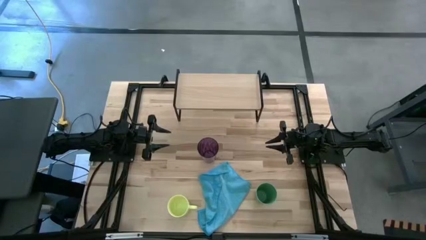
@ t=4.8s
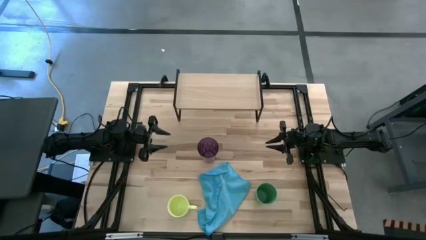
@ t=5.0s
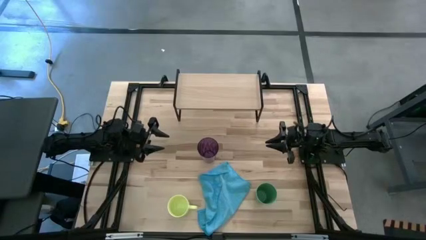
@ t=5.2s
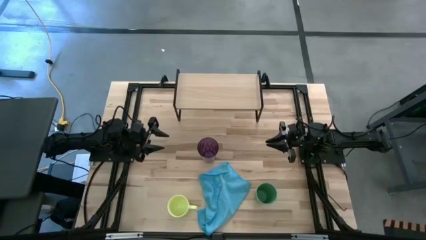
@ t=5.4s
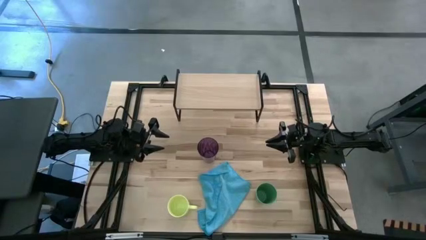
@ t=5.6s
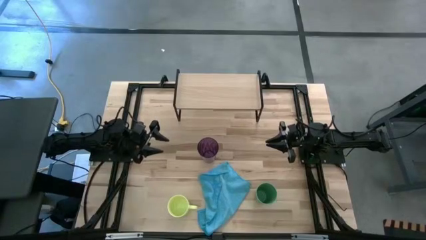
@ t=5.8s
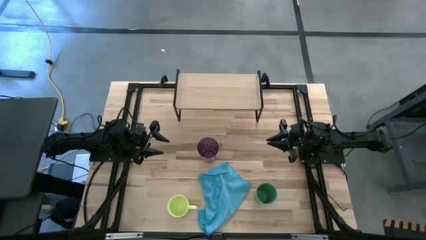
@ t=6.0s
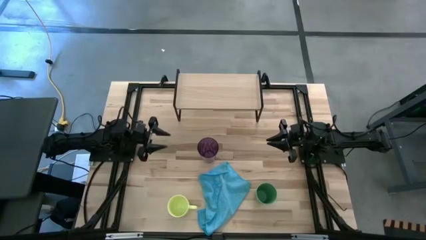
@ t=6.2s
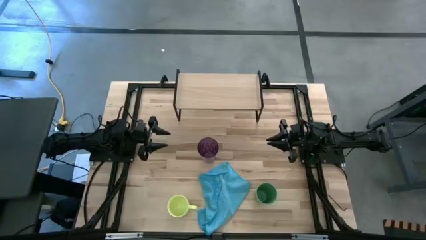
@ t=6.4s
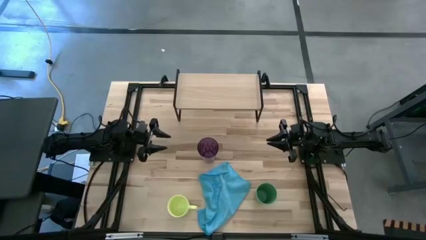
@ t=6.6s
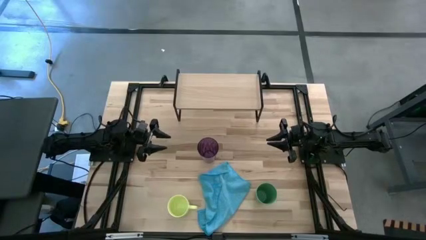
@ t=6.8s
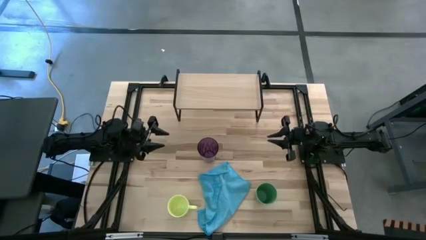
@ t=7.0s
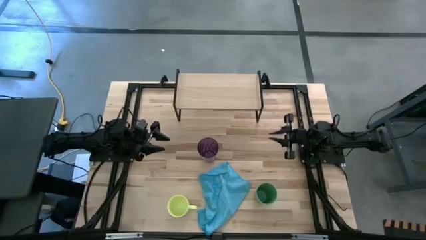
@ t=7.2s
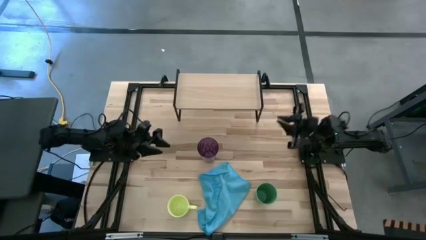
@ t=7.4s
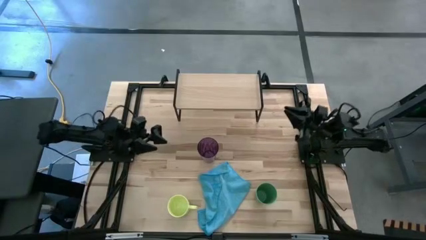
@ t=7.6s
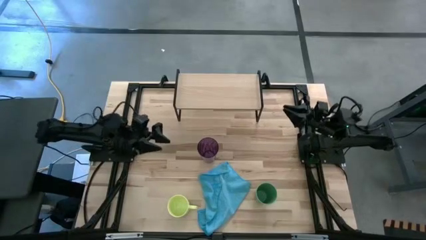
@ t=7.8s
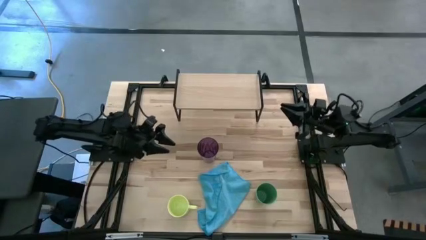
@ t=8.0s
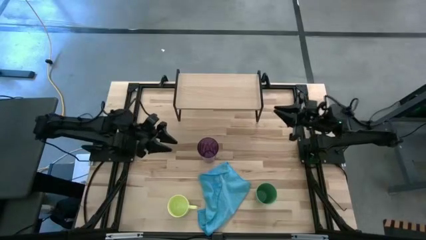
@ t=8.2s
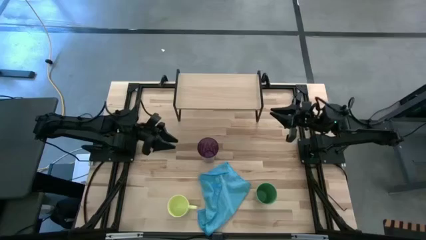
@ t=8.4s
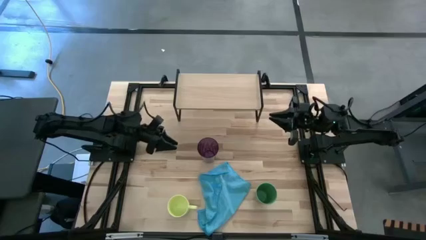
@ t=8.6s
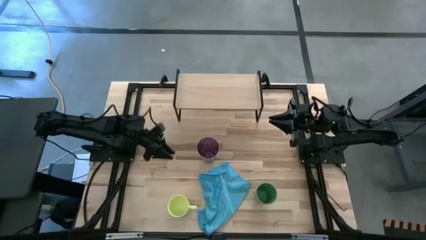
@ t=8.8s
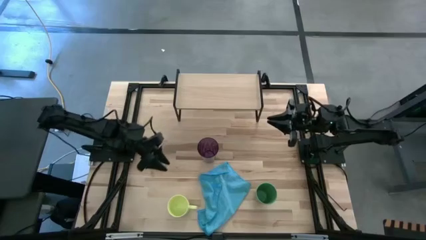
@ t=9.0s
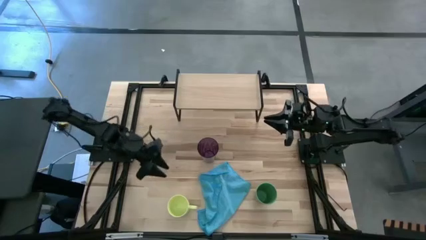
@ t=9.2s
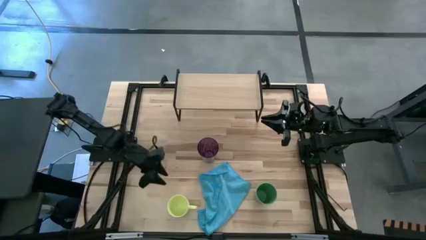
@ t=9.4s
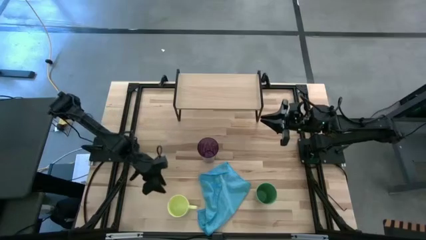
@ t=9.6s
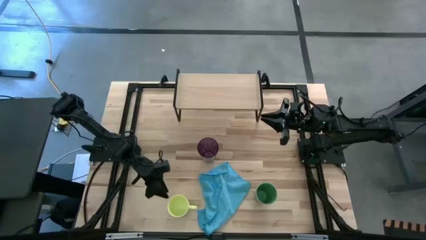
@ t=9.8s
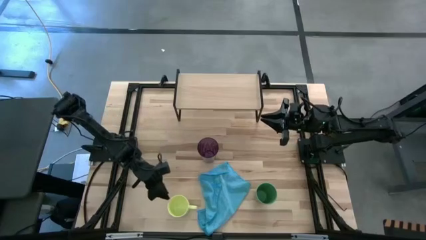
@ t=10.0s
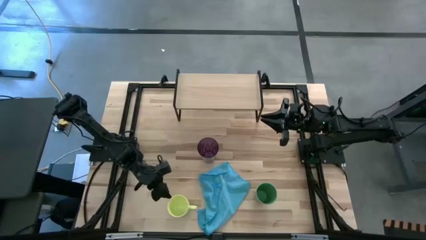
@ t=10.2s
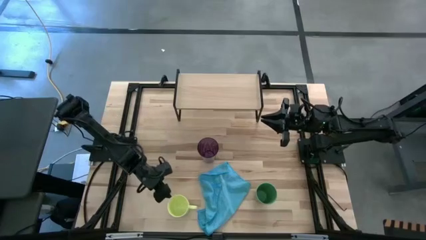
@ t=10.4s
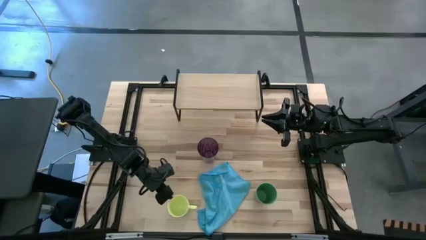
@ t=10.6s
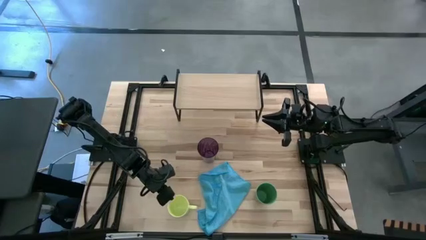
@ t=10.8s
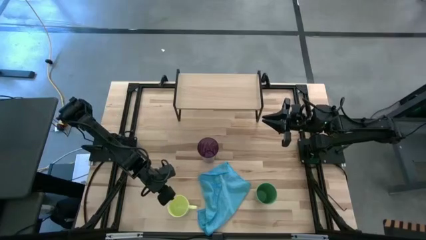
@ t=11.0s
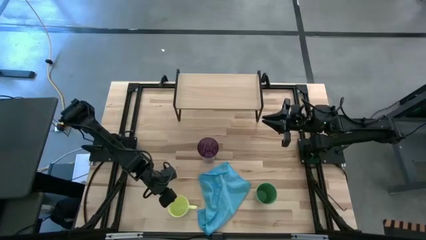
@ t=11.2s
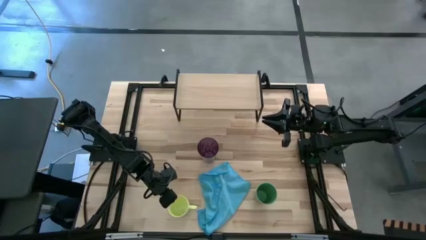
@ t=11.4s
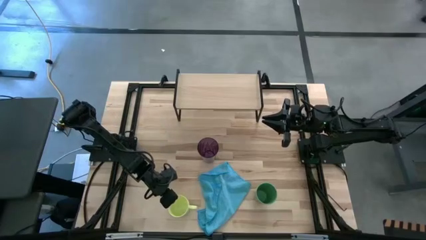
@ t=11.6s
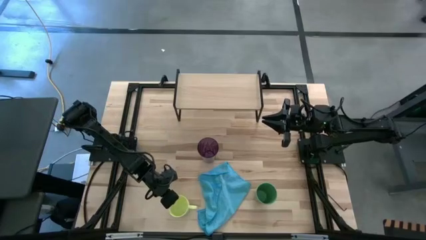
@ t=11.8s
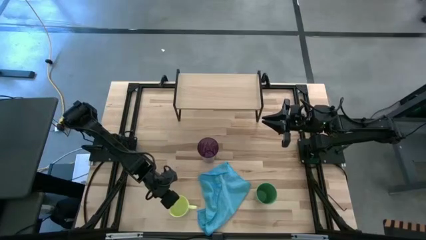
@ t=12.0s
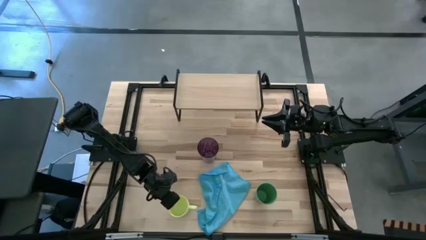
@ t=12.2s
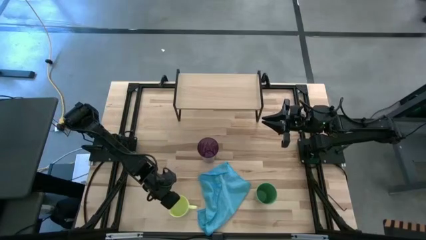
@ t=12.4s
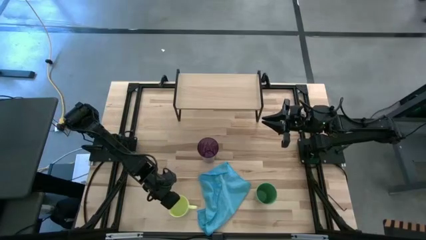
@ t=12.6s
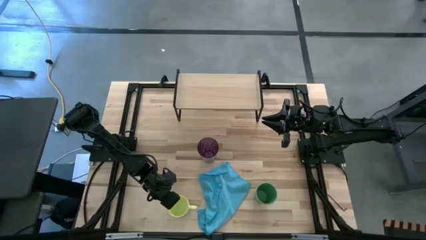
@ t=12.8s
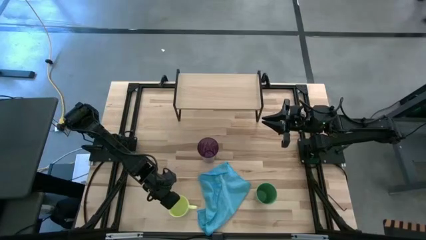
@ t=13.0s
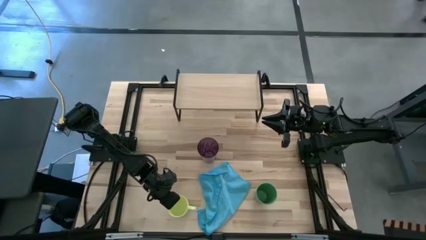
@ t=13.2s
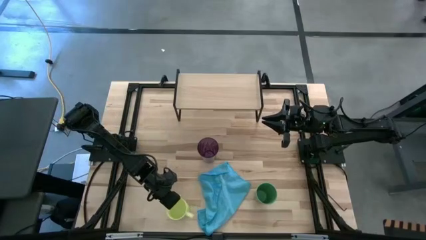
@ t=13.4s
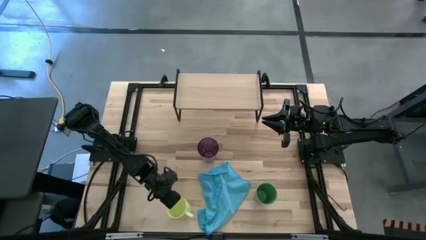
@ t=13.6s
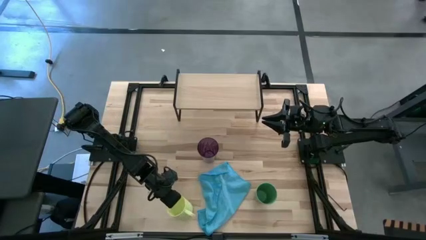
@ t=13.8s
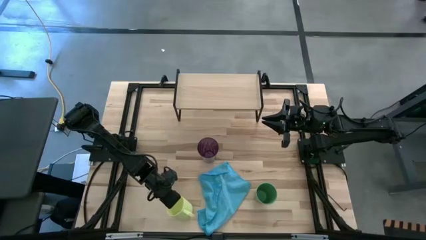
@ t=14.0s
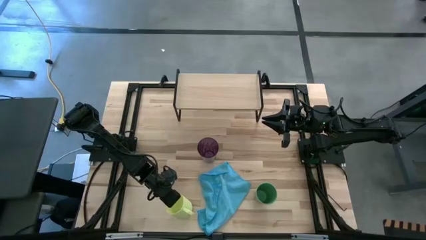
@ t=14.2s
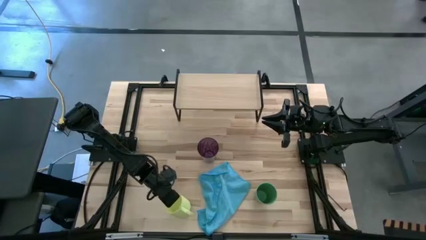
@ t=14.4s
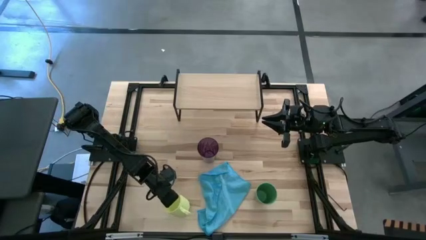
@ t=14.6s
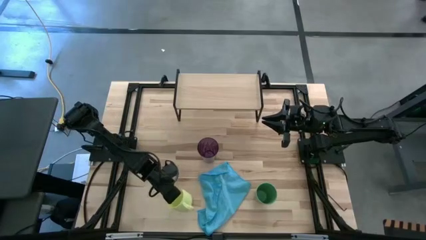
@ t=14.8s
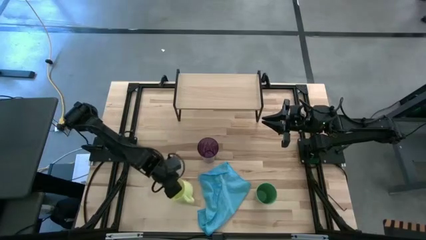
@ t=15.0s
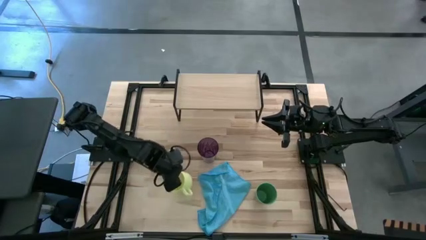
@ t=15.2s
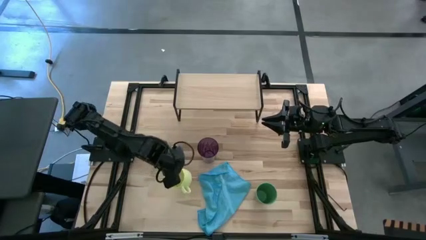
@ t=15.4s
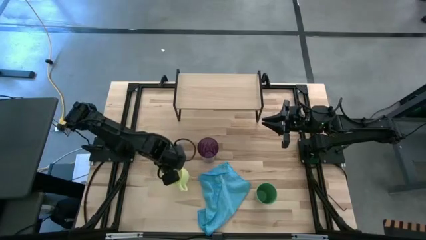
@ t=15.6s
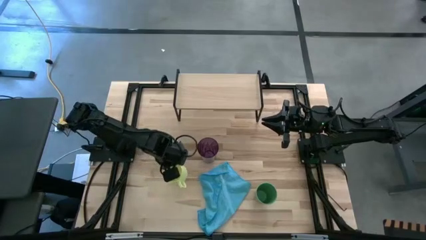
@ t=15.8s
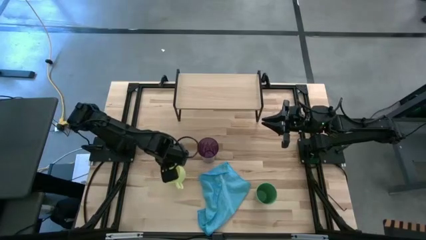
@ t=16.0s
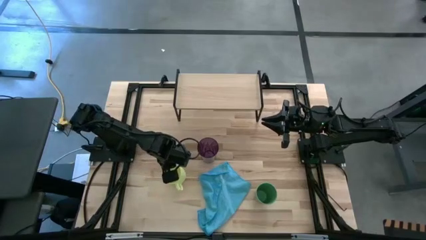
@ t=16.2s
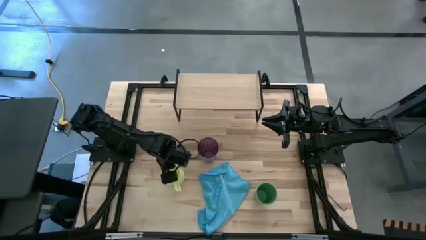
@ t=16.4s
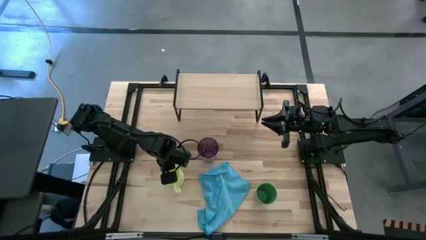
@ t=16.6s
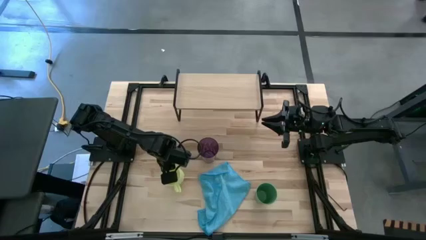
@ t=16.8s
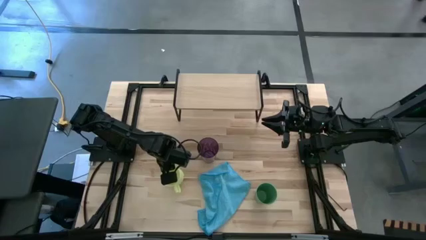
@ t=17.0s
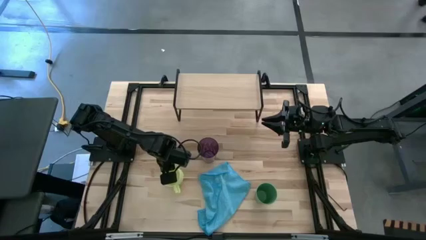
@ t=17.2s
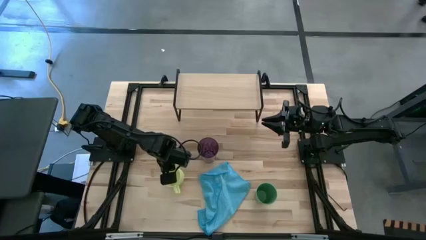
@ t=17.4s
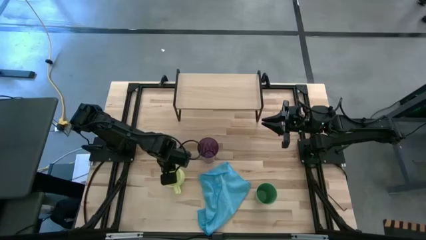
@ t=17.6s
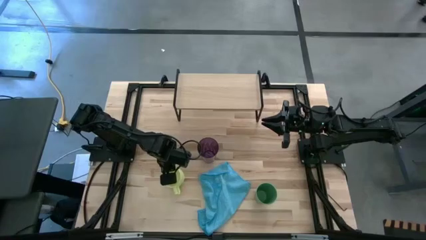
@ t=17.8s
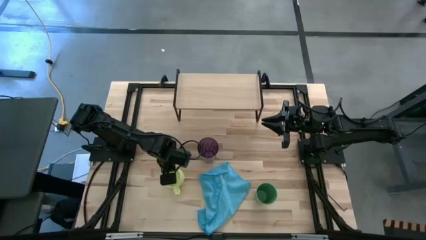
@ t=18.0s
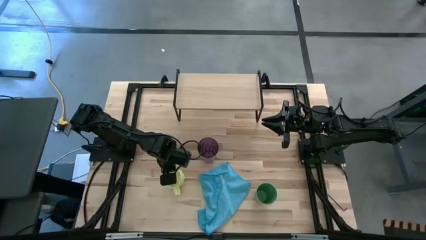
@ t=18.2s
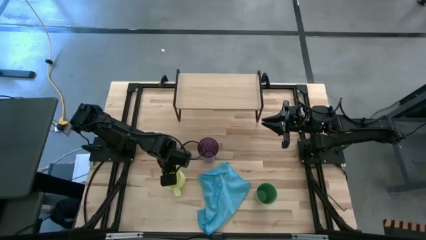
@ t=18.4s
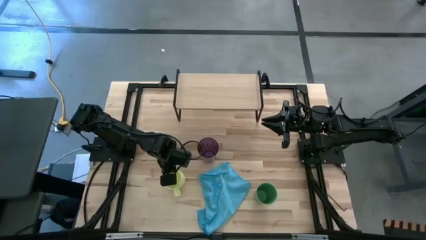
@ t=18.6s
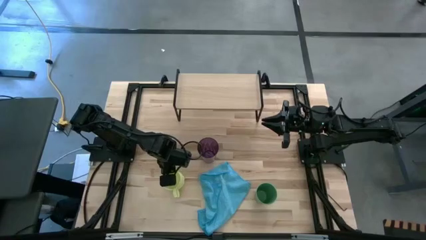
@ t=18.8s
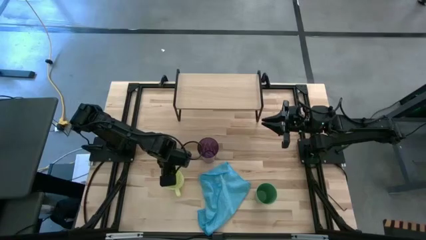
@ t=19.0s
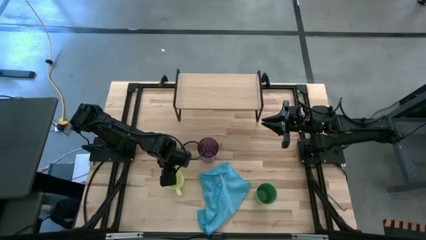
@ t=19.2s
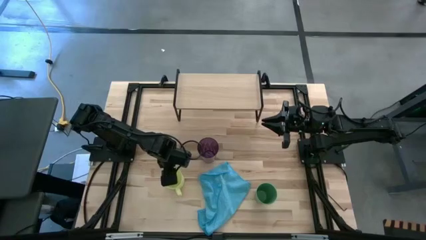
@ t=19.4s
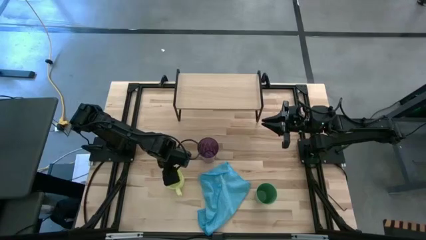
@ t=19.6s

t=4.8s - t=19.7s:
Task: Stack small to large cups/mugs on shelf
Put the yellow cup on the shelf
